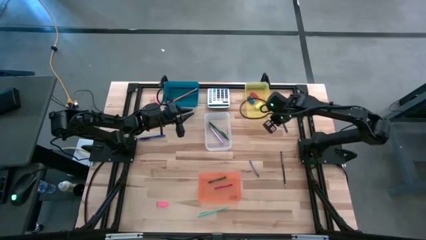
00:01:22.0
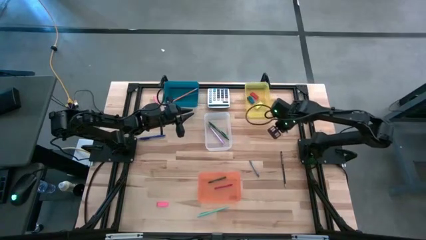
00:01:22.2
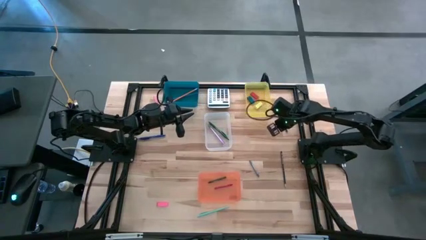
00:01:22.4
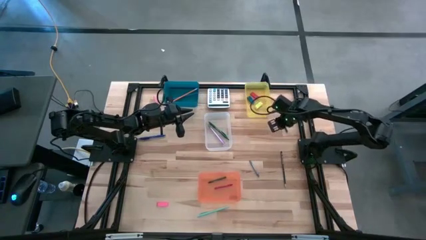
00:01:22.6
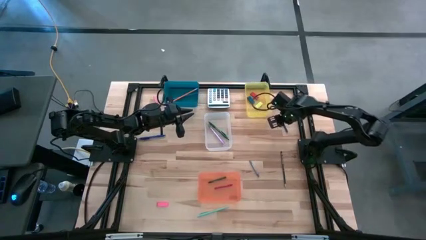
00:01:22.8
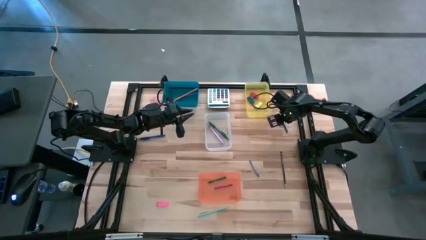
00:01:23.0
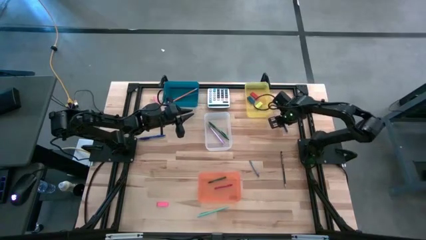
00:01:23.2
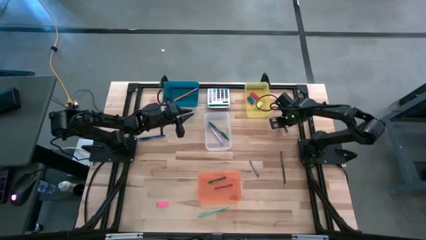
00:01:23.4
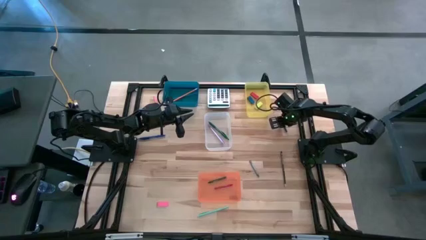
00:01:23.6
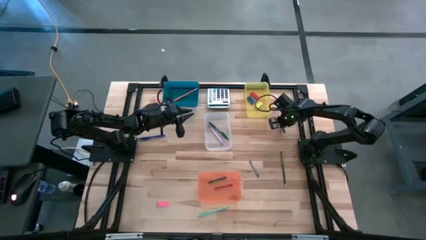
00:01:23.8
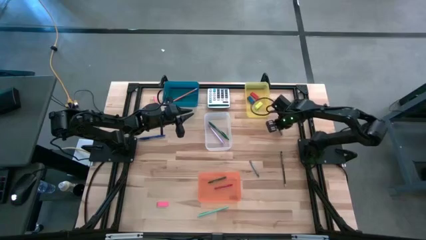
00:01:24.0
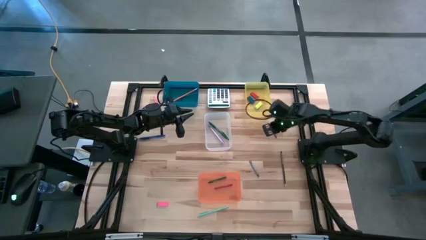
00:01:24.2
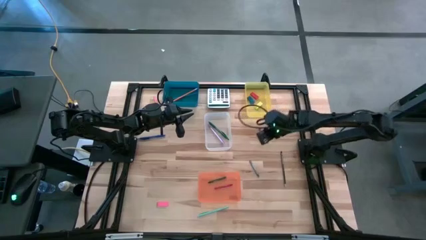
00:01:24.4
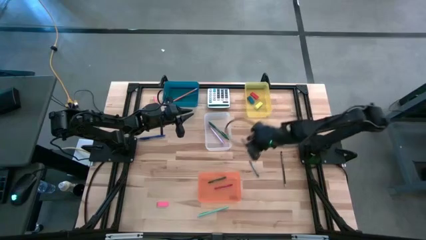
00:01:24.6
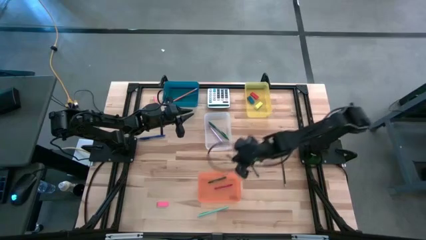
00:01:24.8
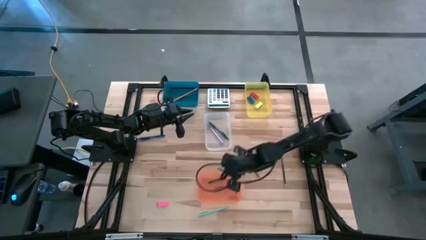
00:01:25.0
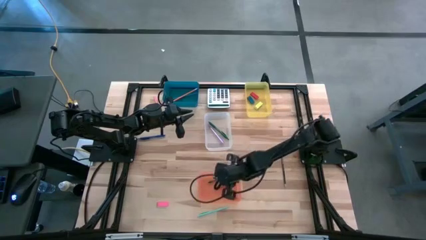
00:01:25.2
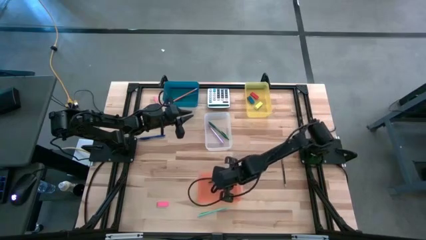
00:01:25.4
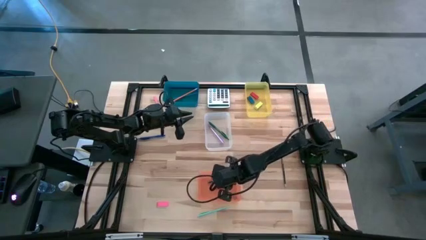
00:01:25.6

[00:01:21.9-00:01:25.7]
Task: Sort crayons/erasers/pens/pencils in bins
Put the blue crayon into the orange bin

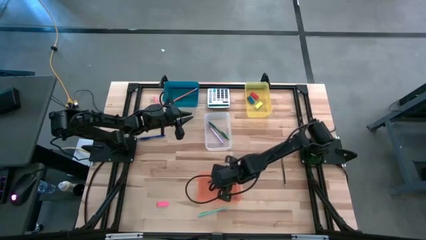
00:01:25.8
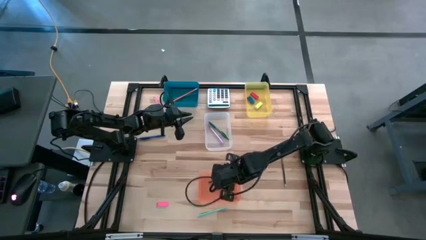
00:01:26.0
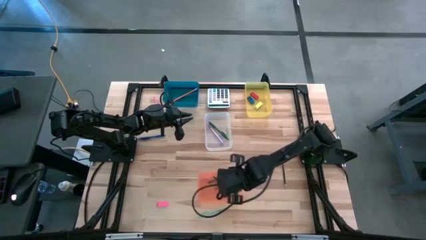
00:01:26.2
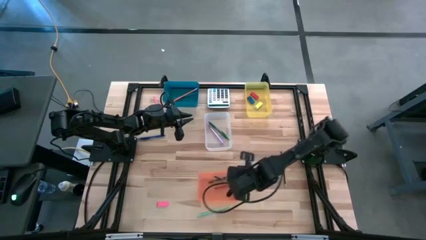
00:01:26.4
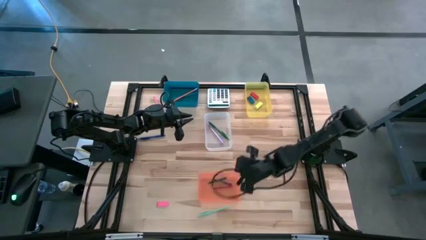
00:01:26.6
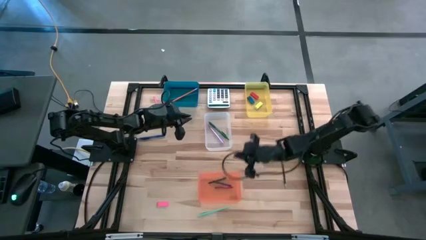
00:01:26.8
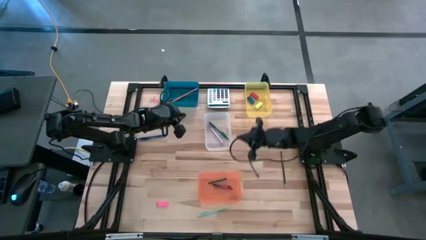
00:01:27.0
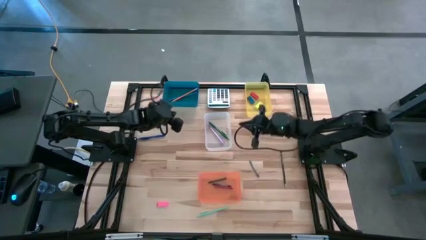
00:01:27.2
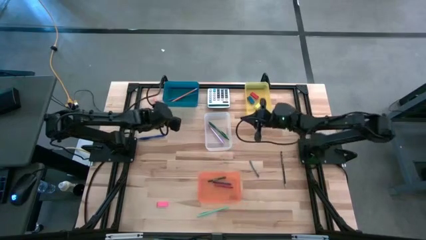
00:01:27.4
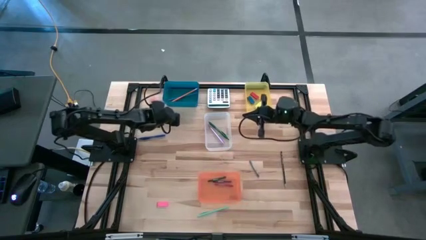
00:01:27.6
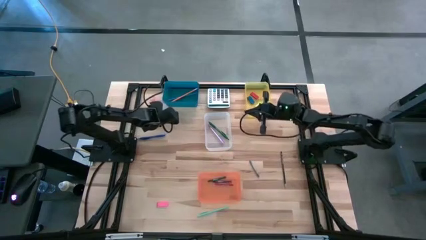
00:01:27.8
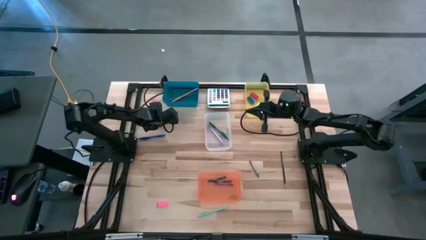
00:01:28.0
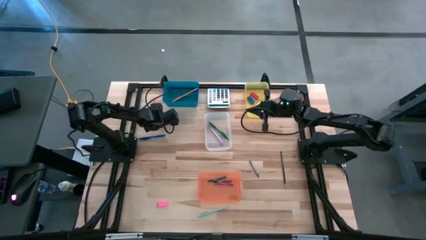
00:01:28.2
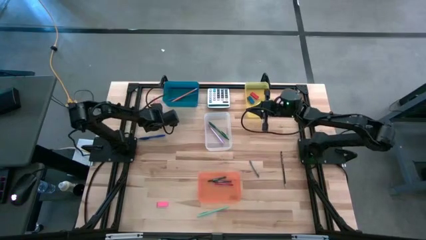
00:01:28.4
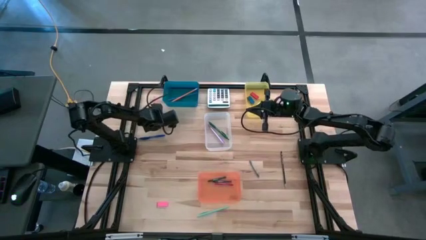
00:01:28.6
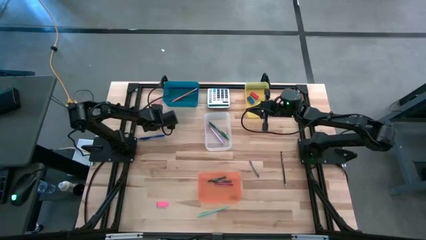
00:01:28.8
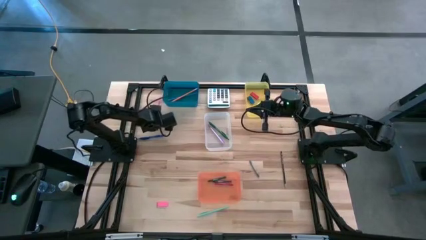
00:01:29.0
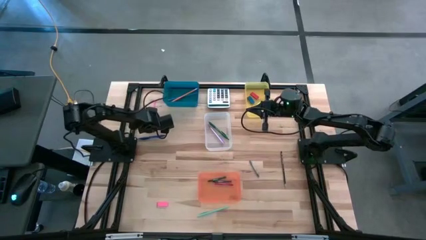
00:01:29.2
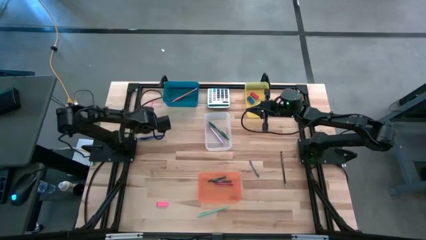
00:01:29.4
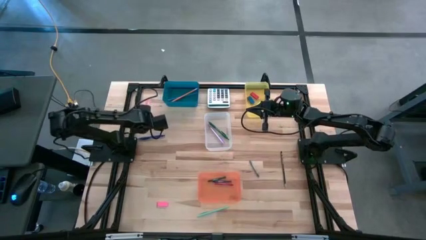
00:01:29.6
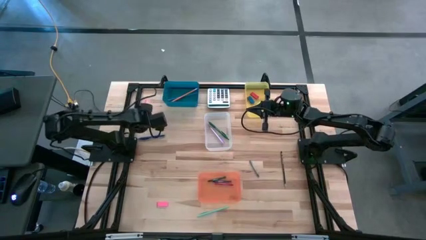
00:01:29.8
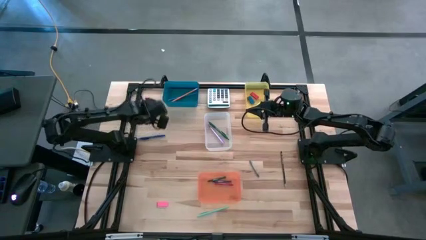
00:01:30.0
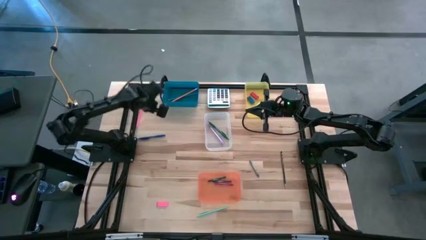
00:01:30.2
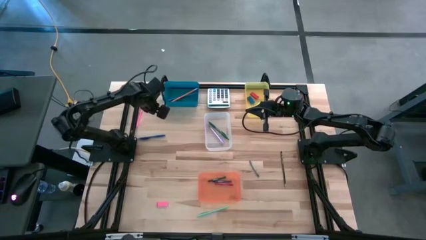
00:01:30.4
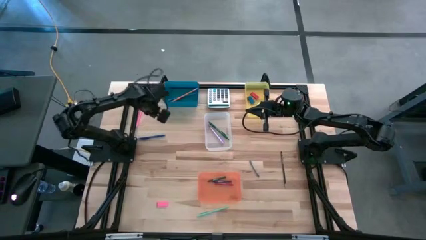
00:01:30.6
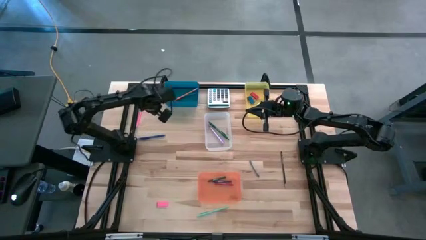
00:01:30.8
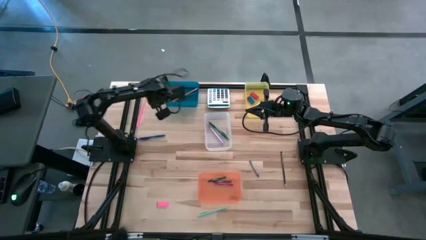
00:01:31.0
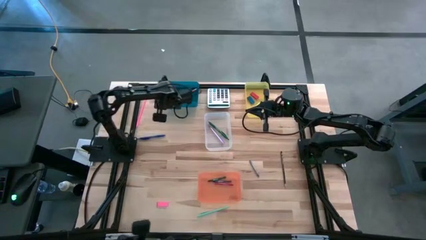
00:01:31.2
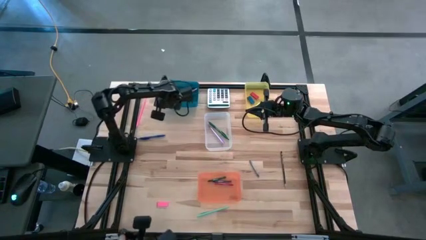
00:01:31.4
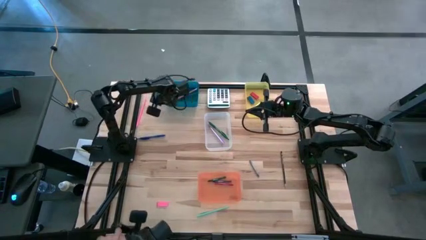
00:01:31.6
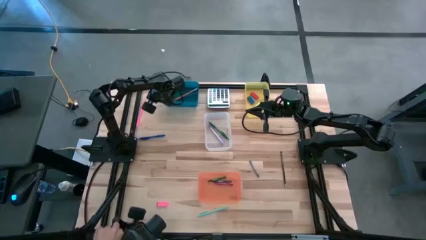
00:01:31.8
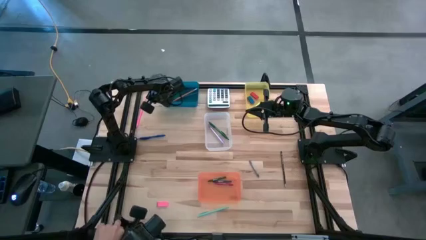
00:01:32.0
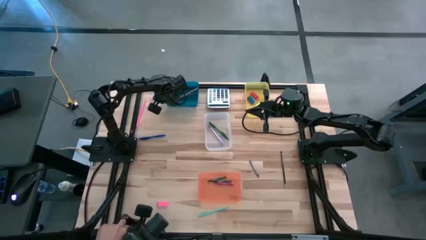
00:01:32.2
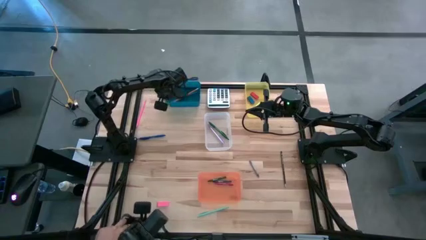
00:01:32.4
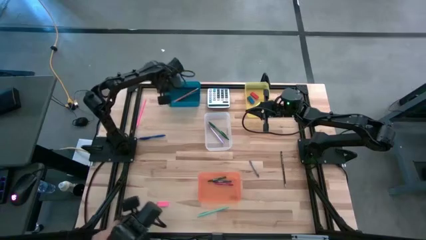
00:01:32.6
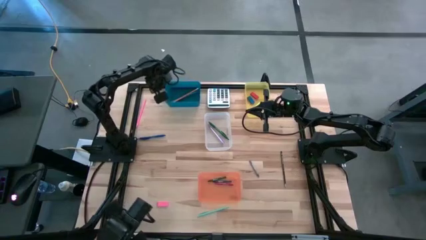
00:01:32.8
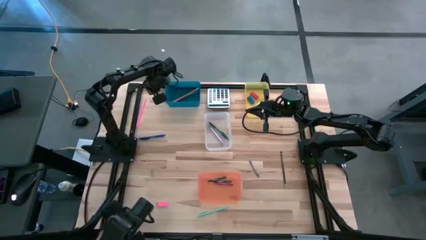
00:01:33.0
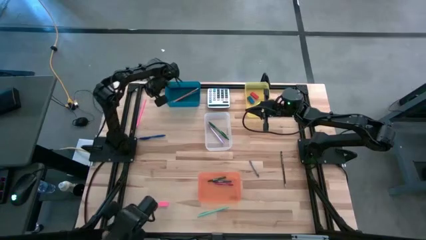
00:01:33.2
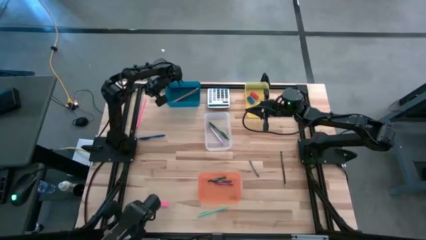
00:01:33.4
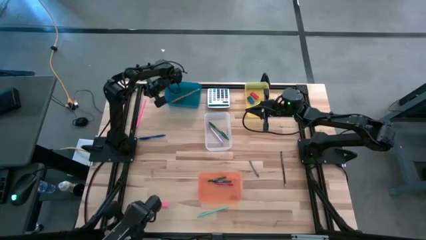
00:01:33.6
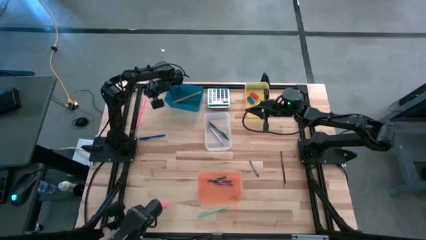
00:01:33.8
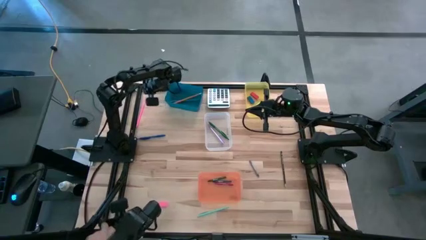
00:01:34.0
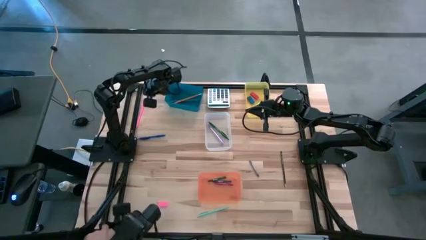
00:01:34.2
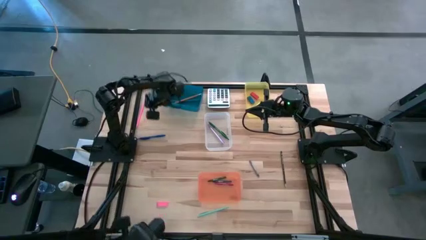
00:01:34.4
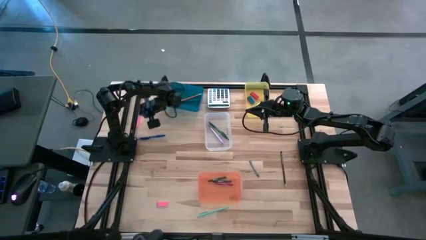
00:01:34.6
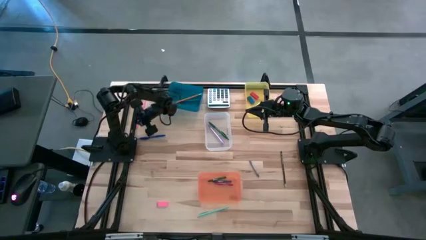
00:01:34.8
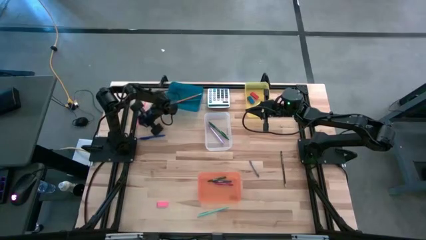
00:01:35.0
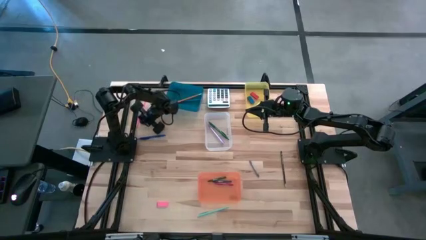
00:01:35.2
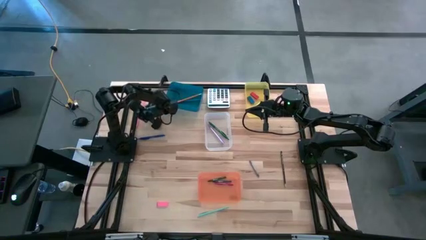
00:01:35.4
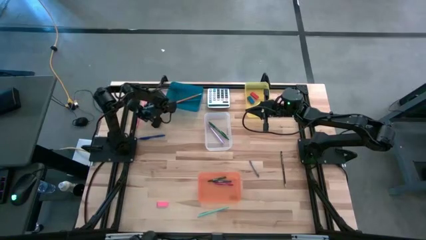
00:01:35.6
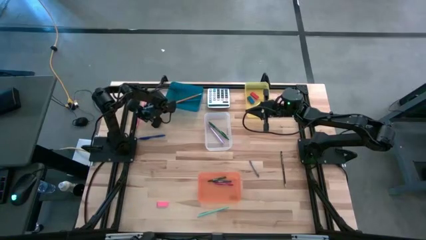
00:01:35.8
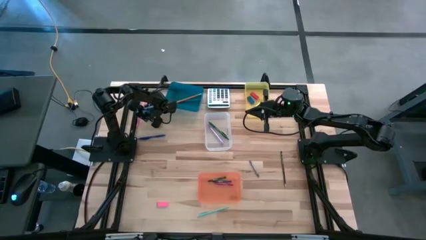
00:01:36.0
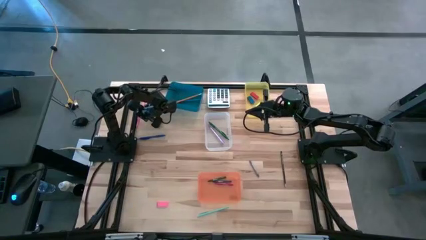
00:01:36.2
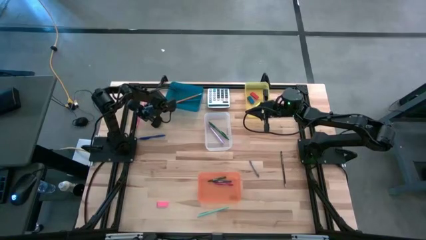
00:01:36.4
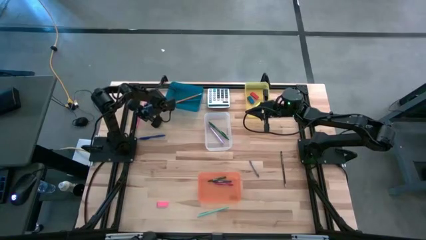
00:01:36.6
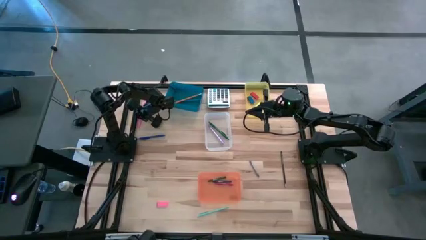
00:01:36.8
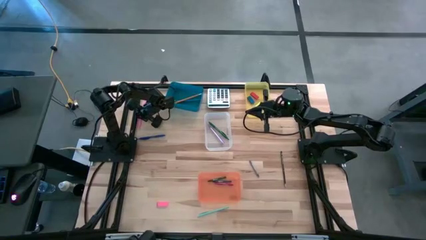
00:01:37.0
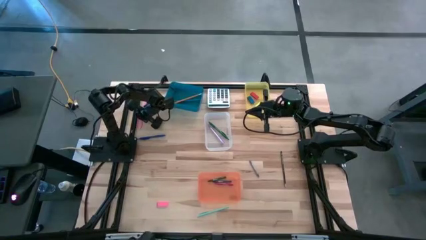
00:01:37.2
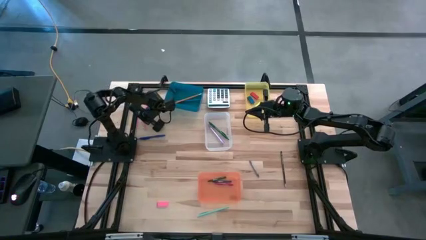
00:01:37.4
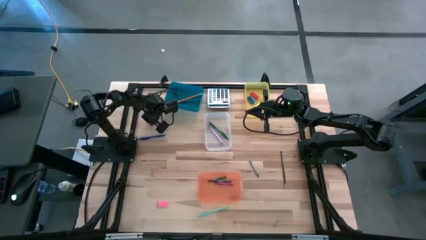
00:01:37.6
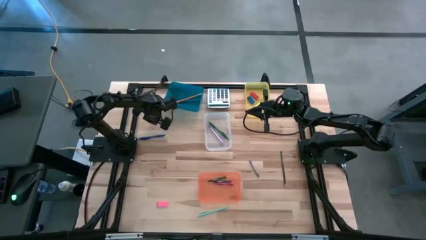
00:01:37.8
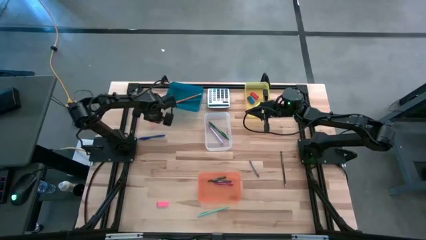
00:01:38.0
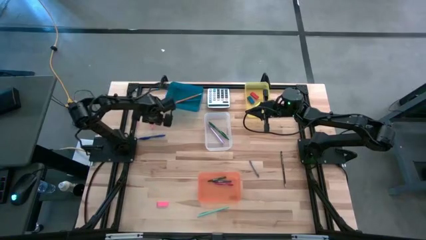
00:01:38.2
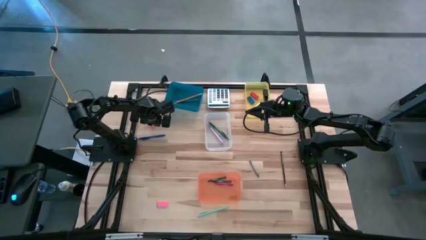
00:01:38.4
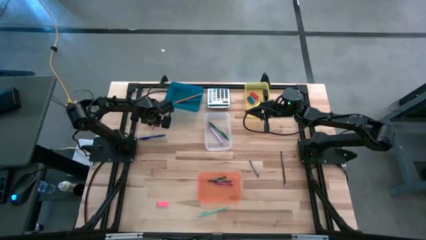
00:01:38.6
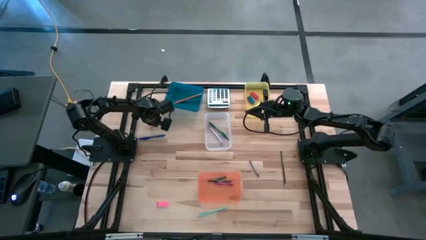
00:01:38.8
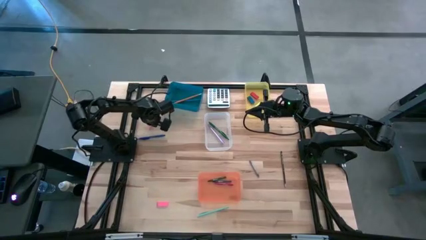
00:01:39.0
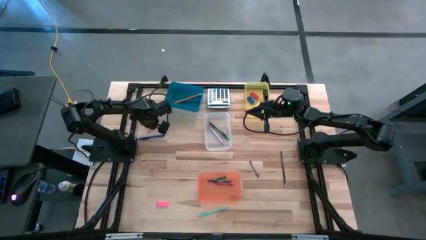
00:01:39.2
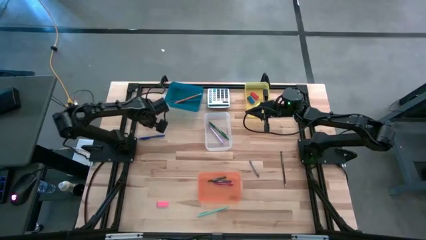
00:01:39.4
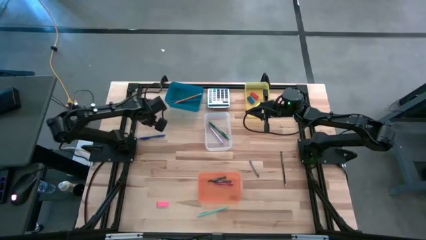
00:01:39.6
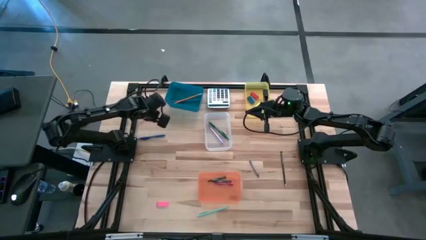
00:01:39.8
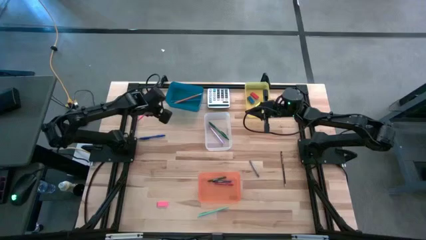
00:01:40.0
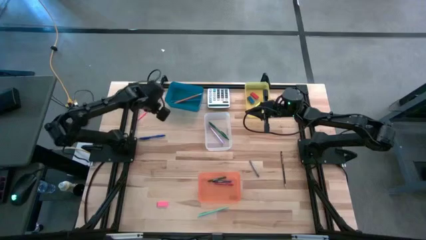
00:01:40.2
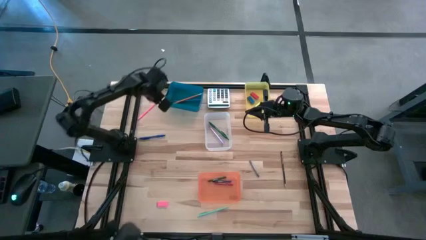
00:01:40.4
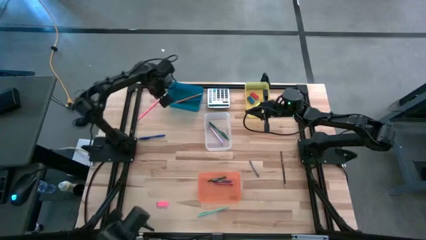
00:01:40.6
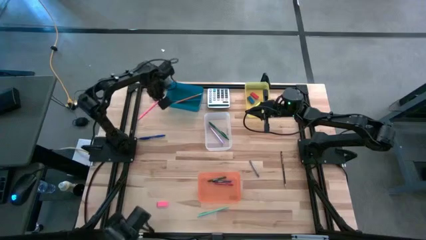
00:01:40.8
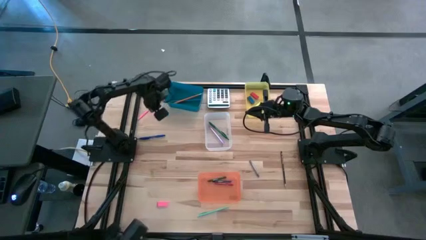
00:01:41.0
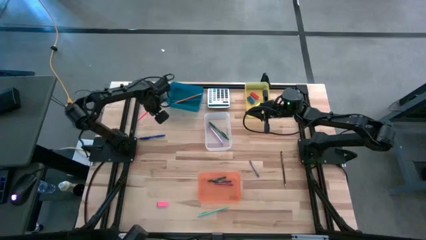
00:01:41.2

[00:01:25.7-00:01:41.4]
Put the pink pencil into the blue bin
